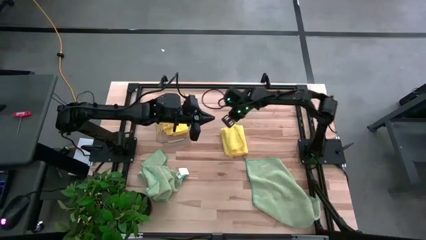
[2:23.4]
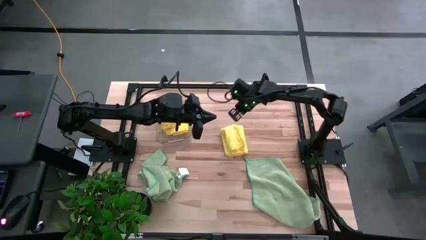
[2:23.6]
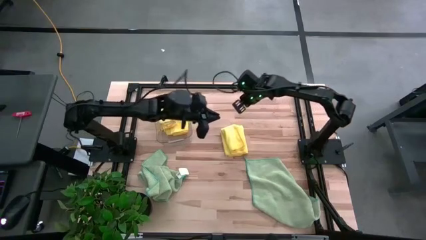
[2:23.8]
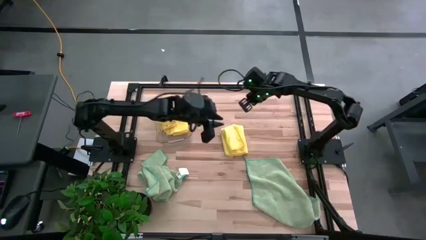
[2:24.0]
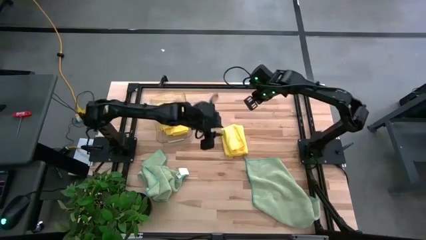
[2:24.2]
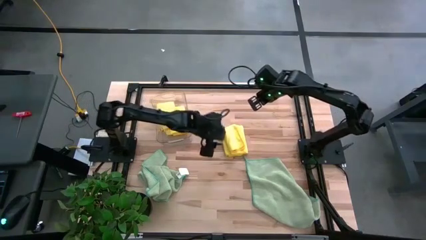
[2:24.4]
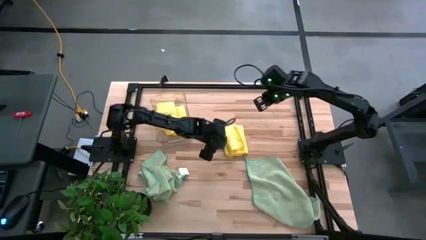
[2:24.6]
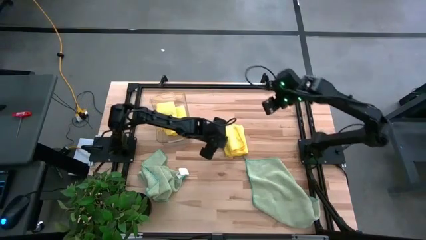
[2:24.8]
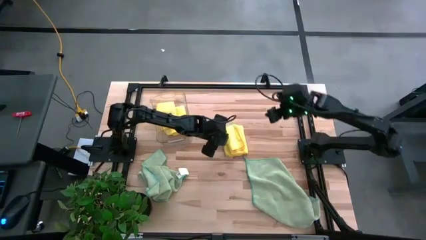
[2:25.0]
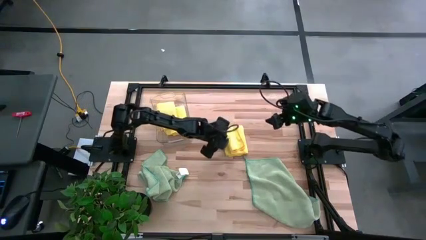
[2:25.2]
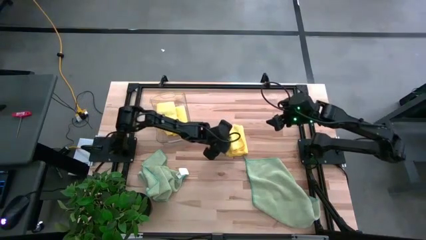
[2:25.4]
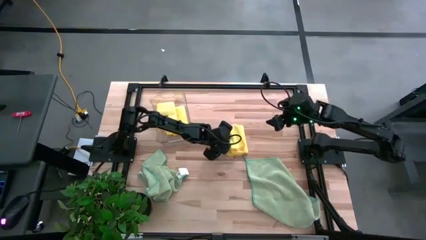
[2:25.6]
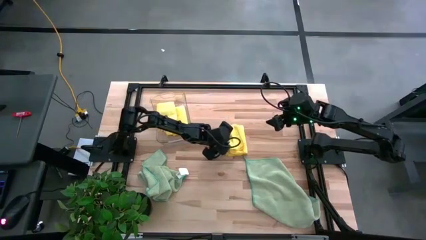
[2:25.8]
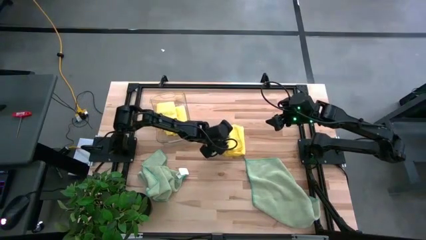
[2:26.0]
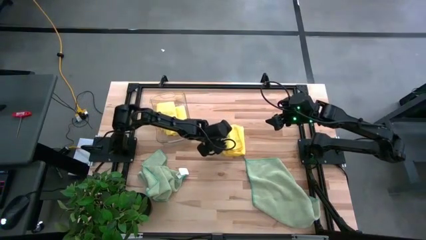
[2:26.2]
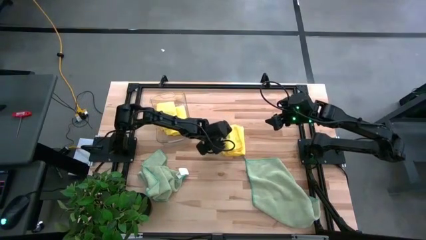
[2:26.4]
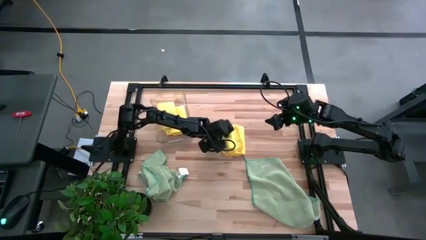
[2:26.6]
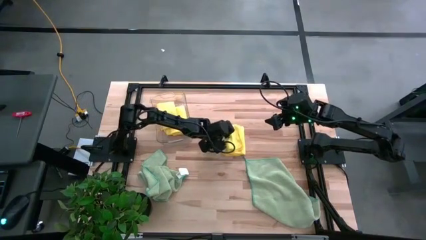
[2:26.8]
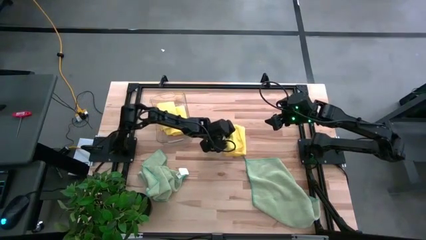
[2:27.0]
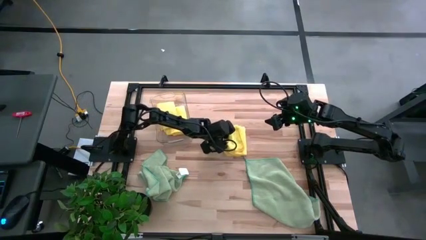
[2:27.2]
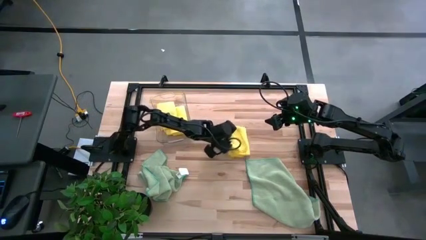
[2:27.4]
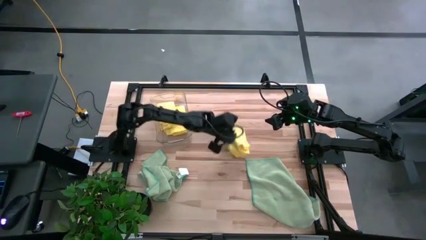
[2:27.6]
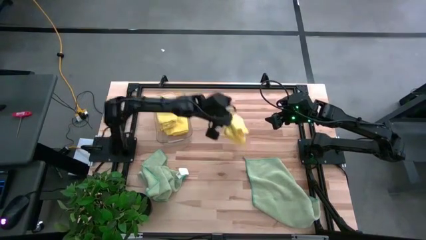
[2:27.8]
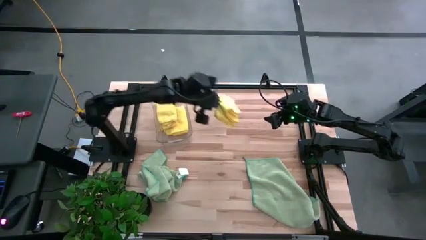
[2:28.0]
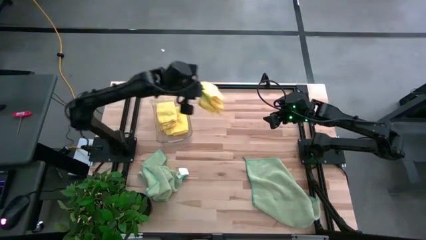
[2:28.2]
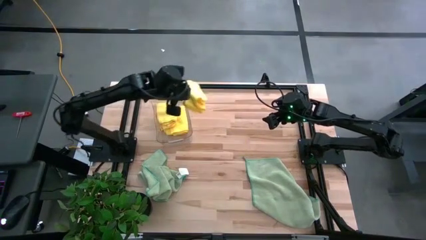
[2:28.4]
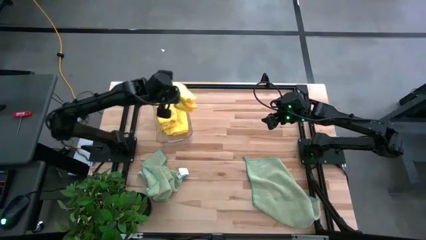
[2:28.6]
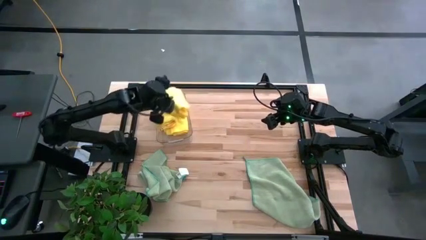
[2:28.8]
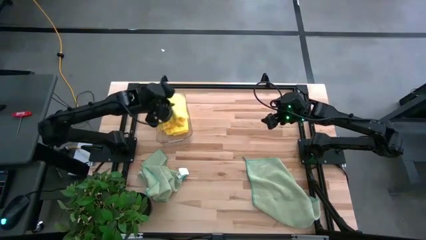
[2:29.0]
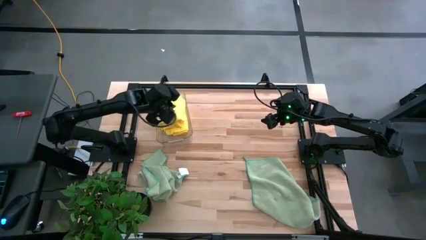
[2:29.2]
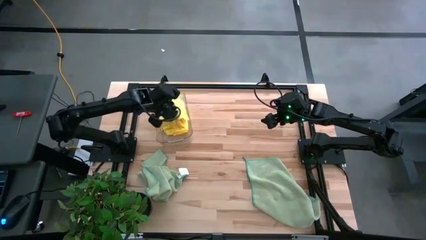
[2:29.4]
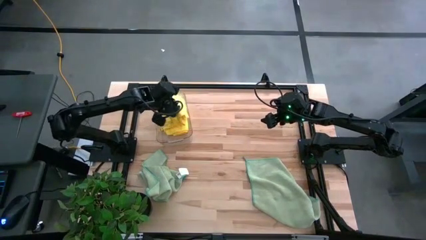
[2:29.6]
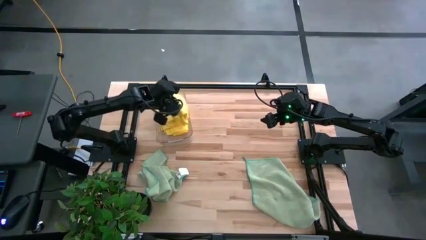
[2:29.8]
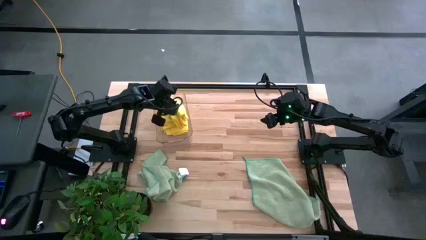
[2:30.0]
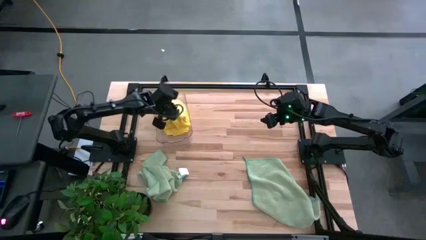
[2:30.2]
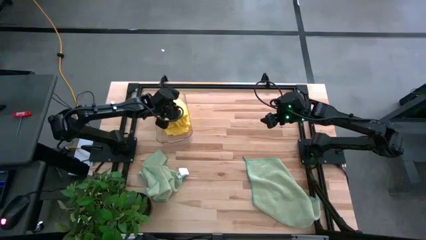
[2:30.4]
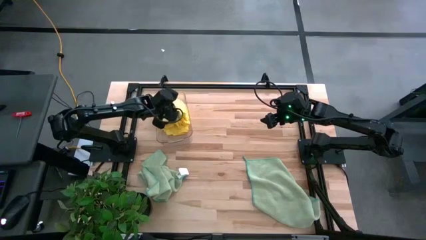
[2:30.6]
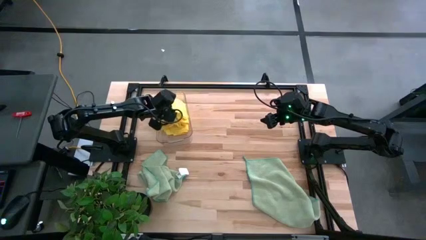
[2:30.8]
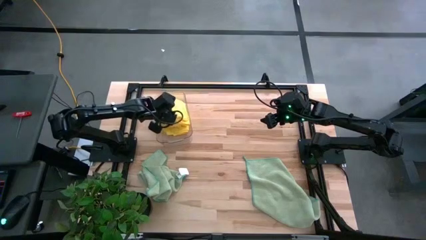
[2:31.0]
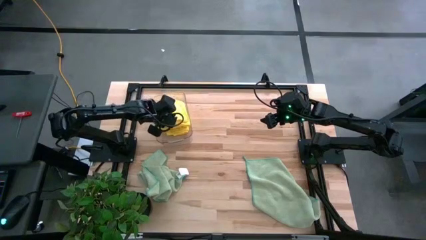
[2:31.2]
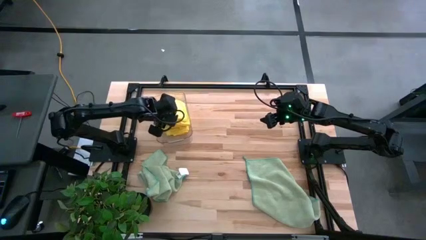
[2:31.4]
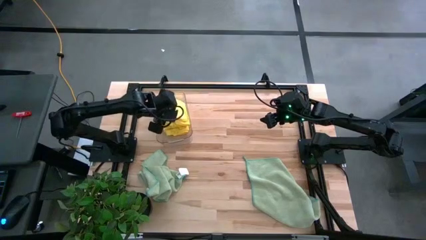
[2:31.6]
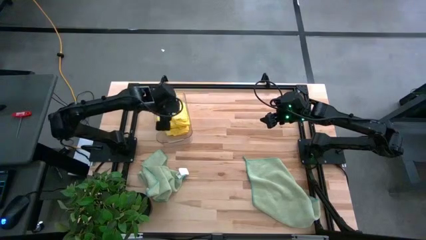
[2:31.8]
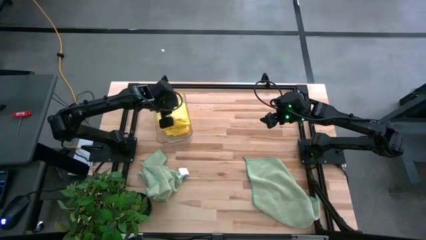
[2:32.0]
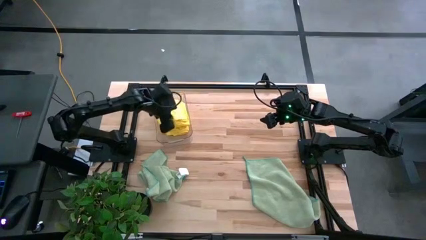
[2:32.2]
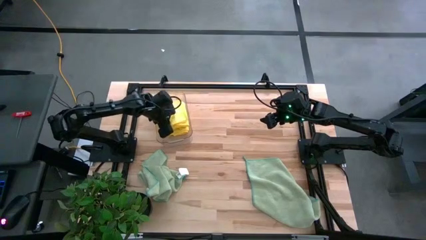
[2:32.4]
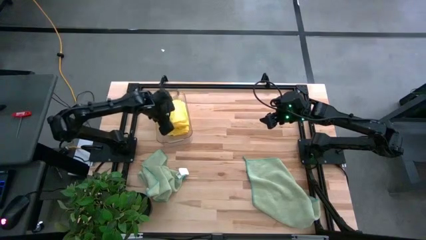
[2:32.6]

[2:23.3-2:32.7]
Task: Fold microfiber towels
Put the folded yellow towel into the transparent bin
